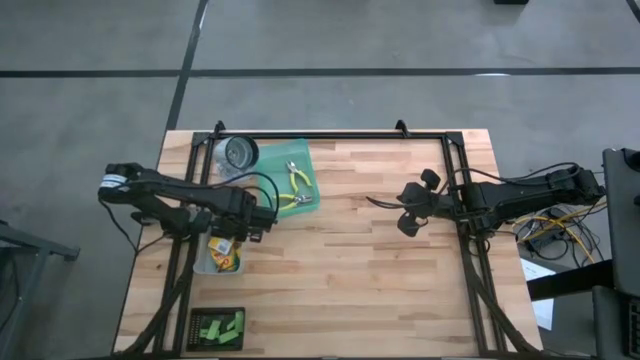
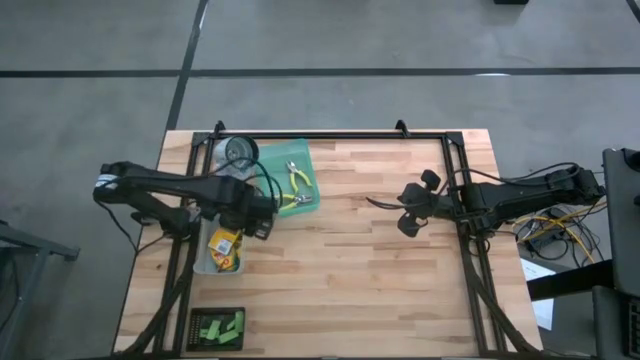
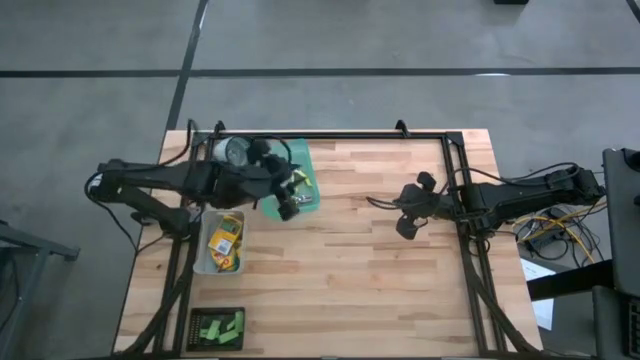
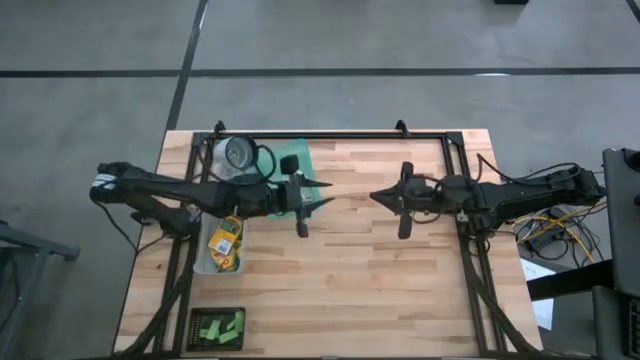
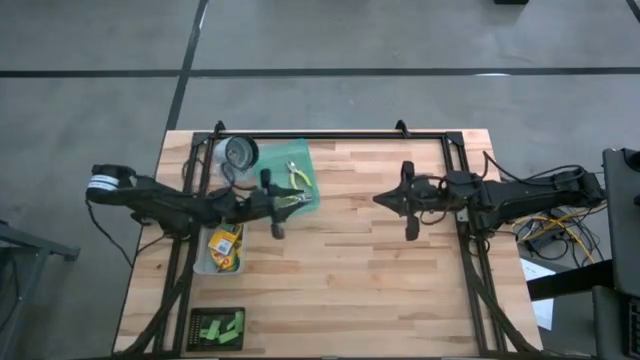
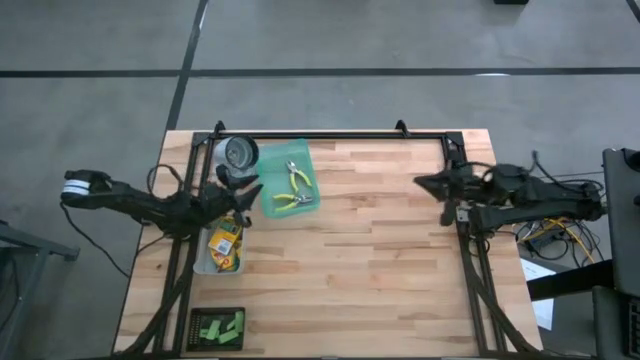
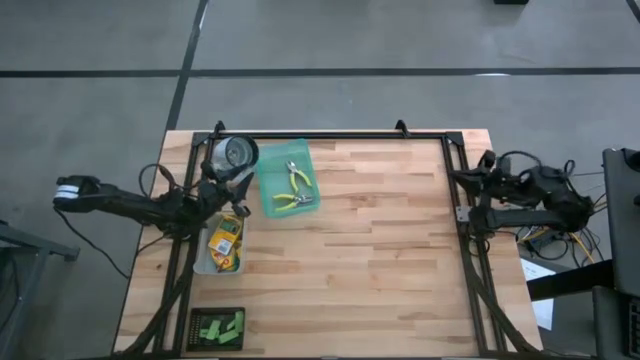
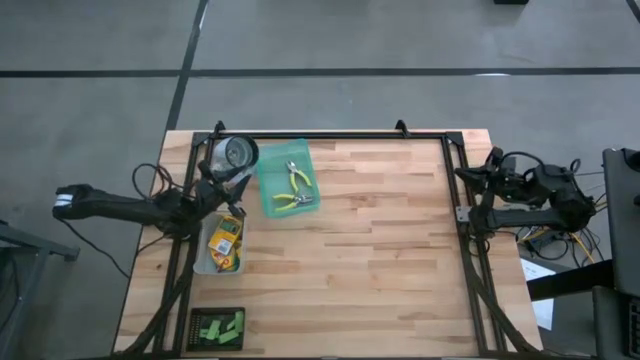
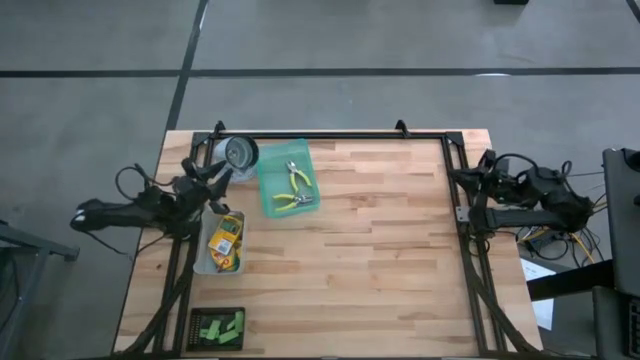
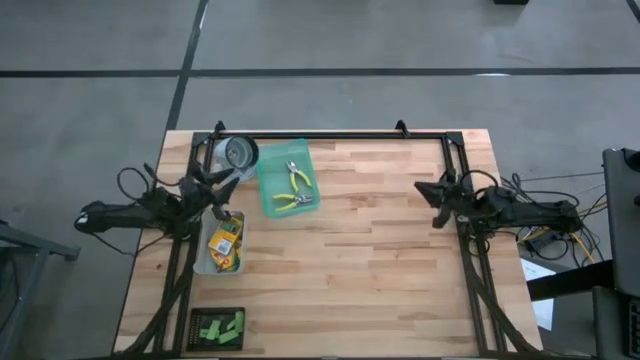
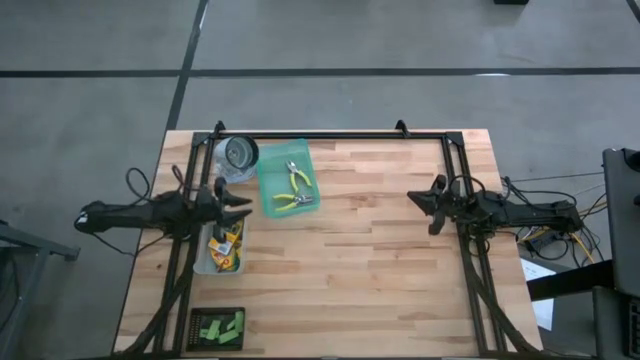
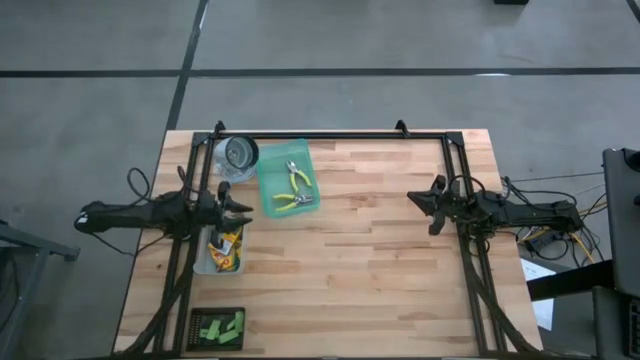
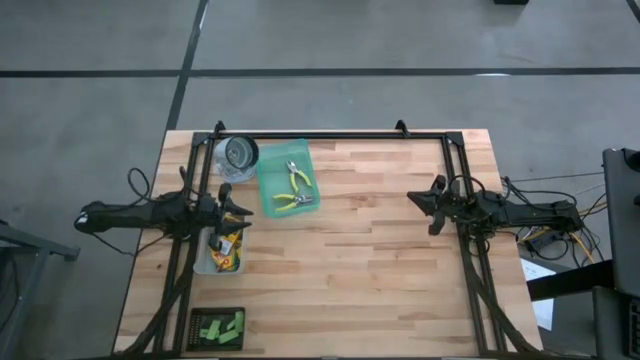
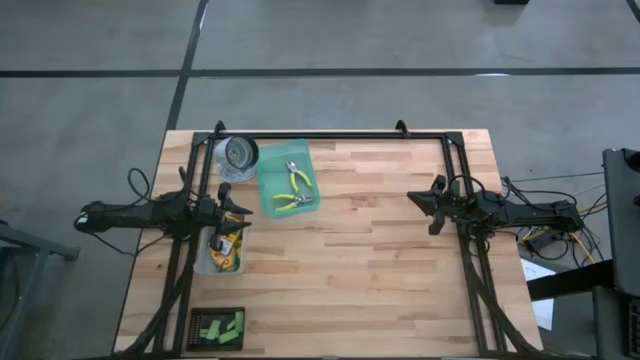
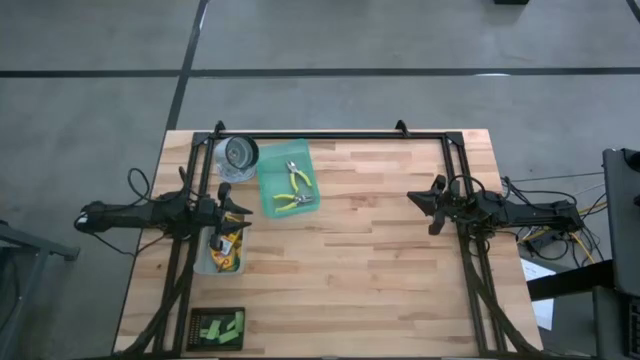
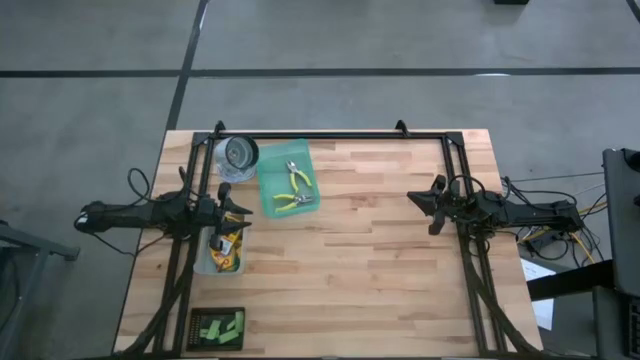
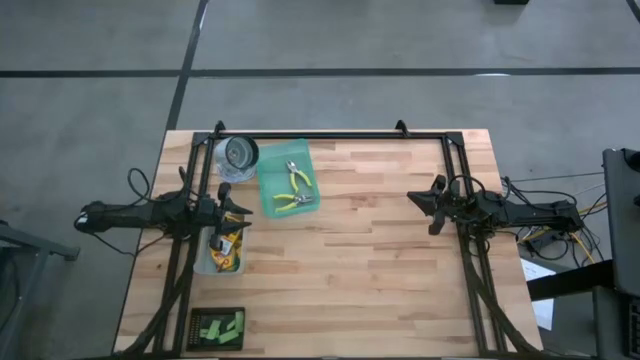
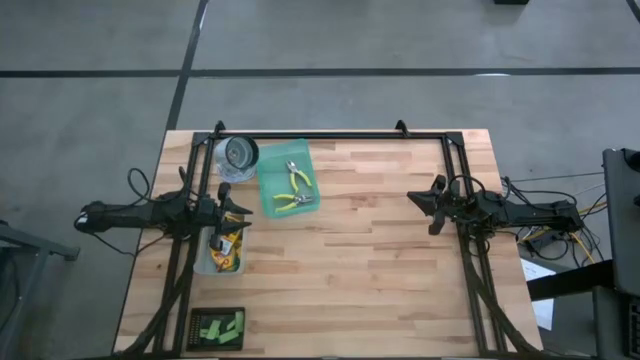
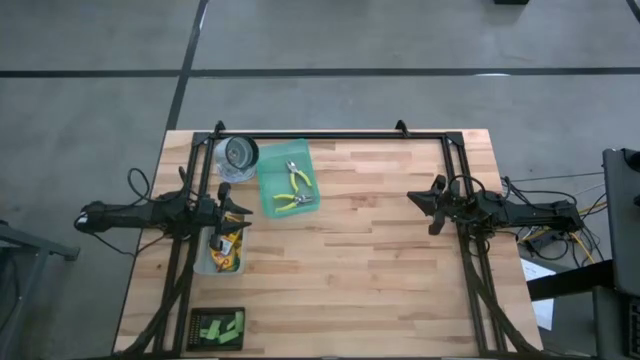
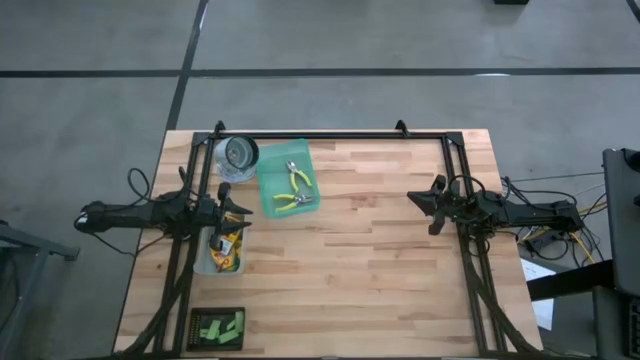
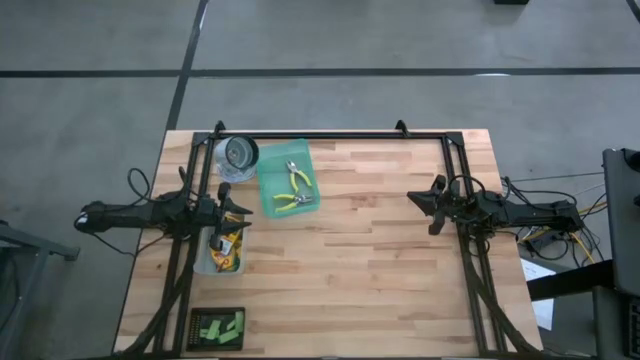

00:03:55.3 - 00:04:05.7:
Task: Pick & Place School Supplies
Return to Home Position

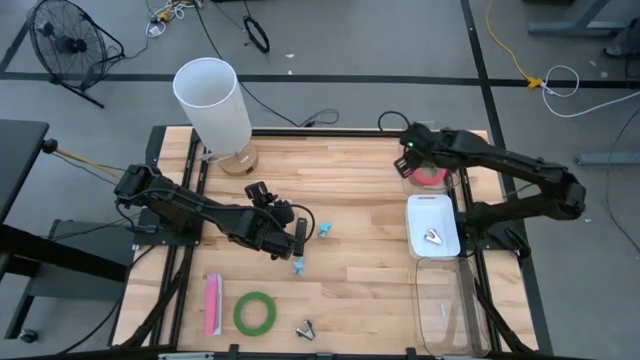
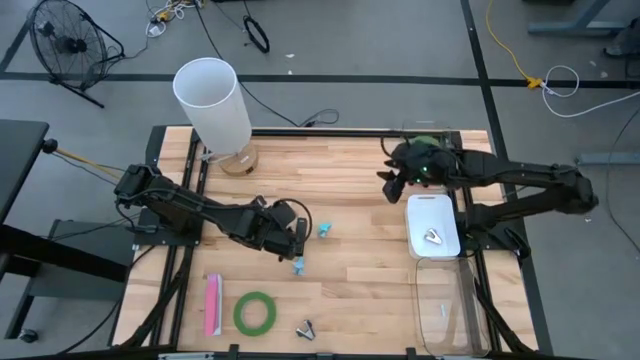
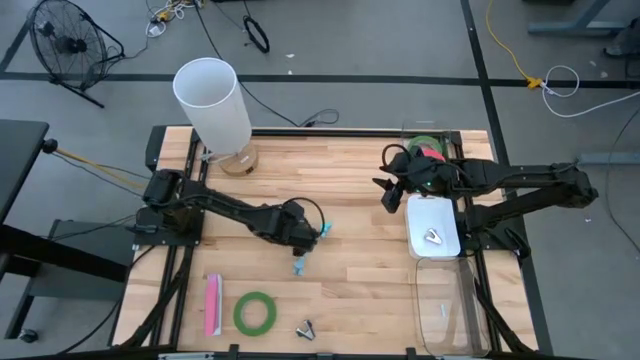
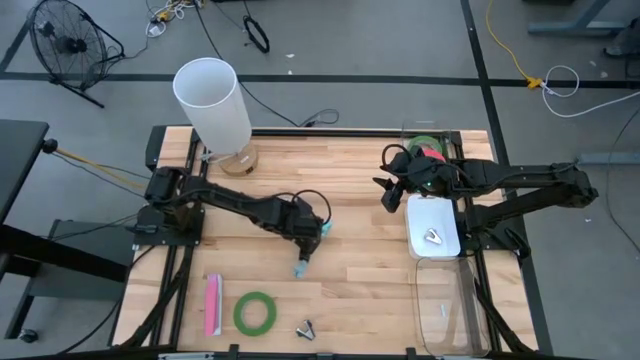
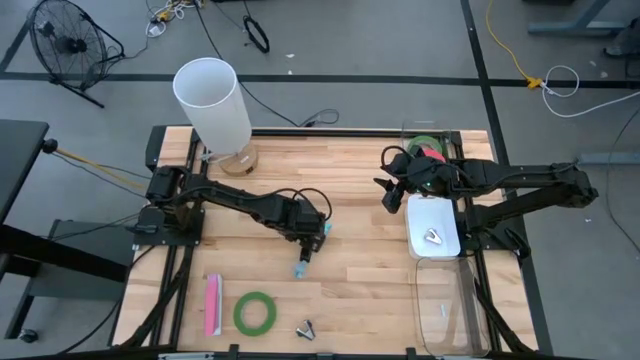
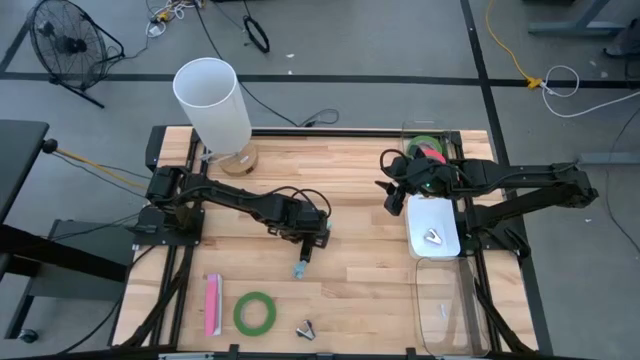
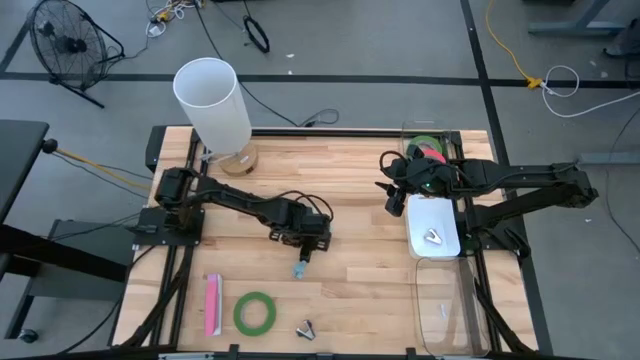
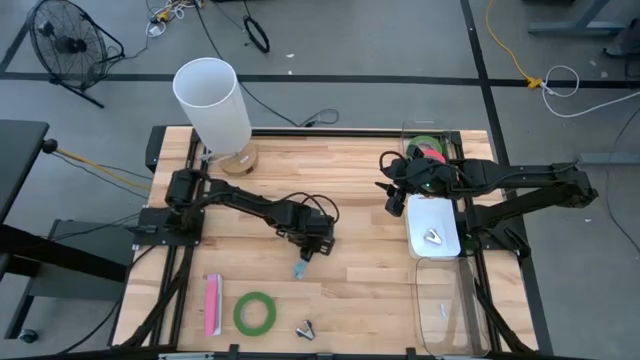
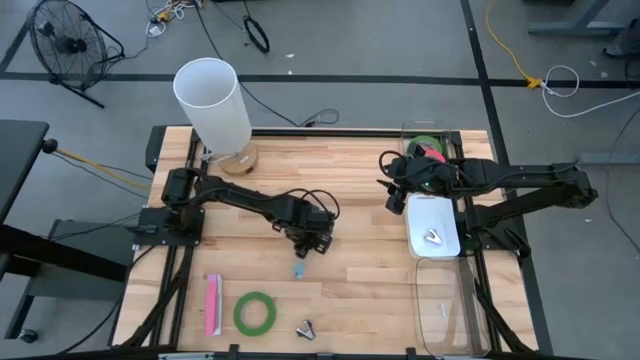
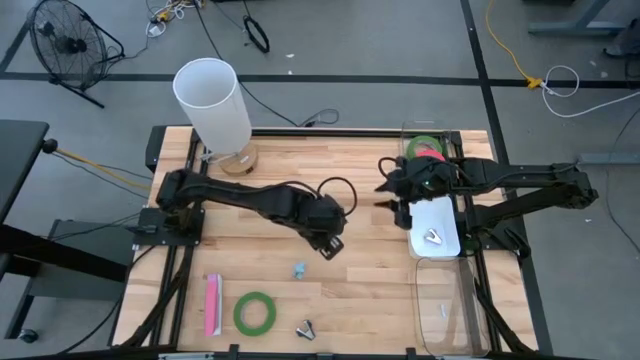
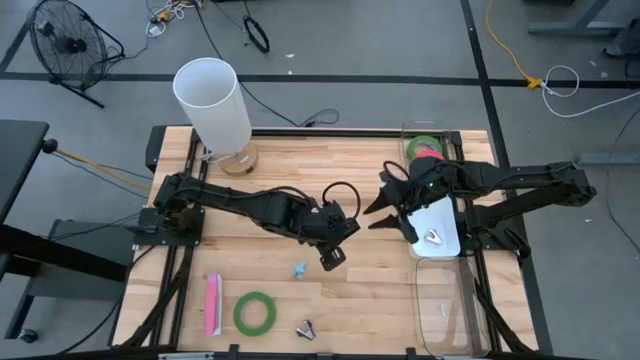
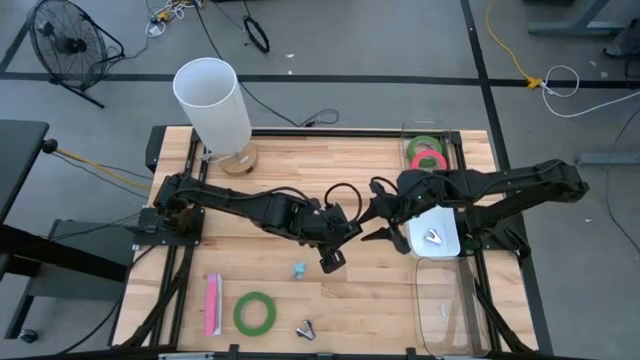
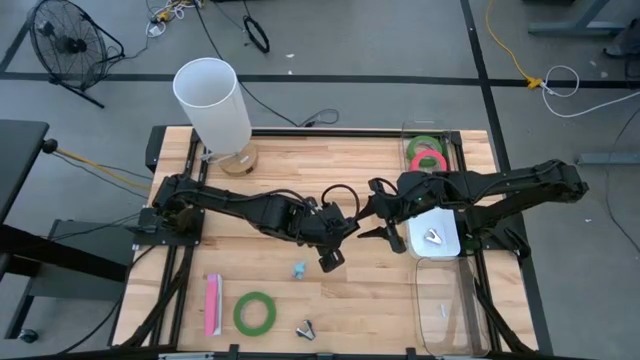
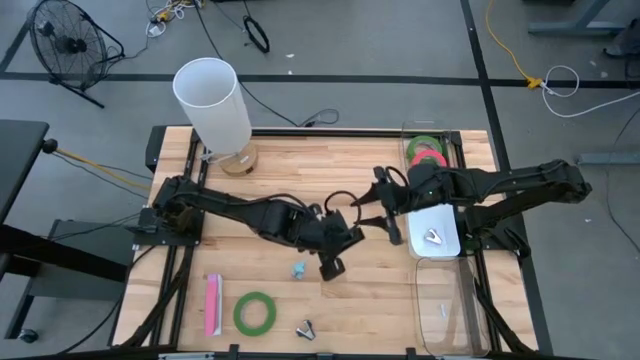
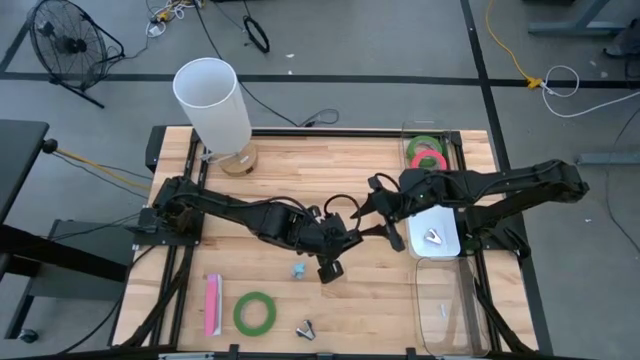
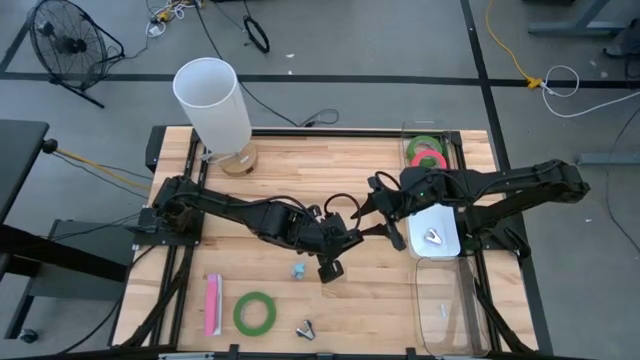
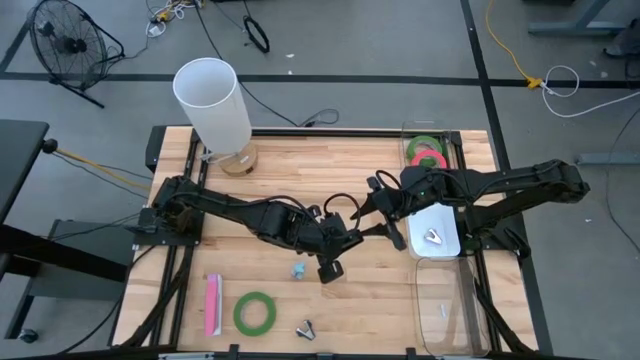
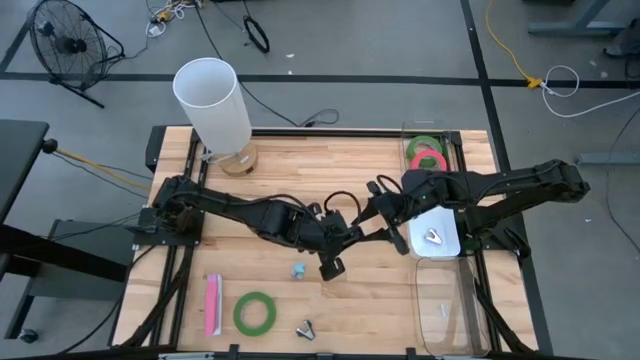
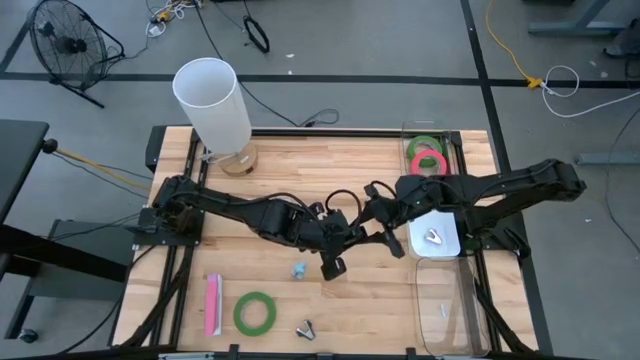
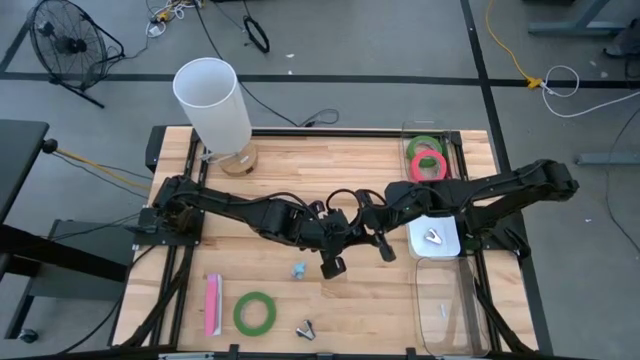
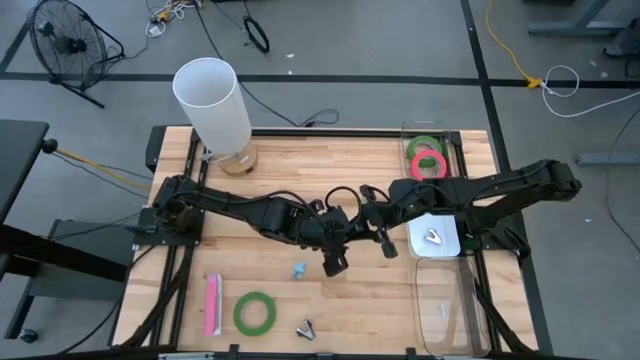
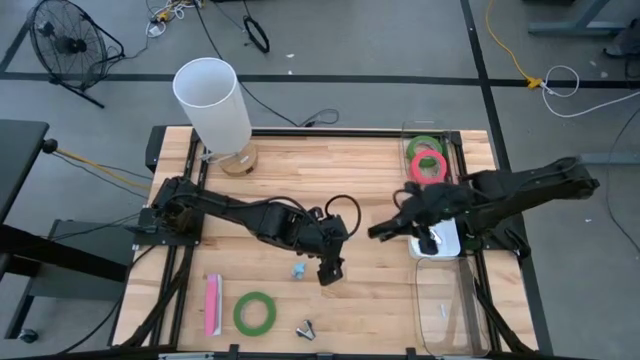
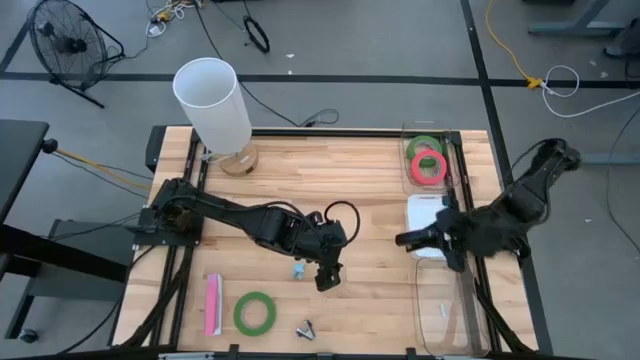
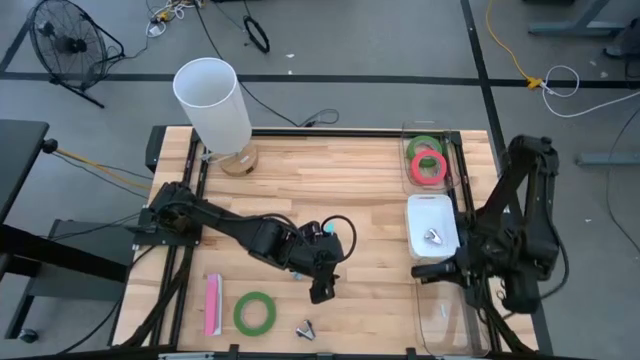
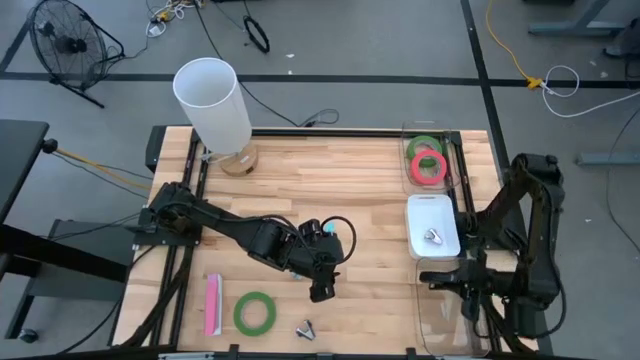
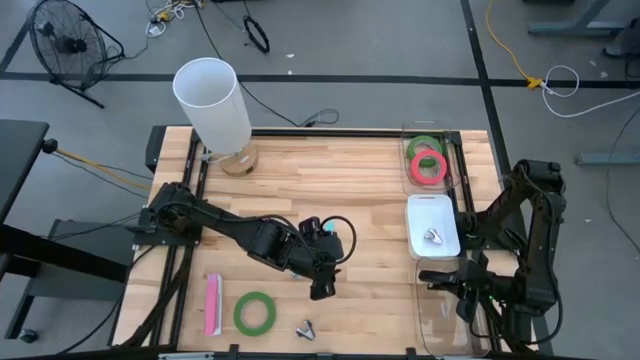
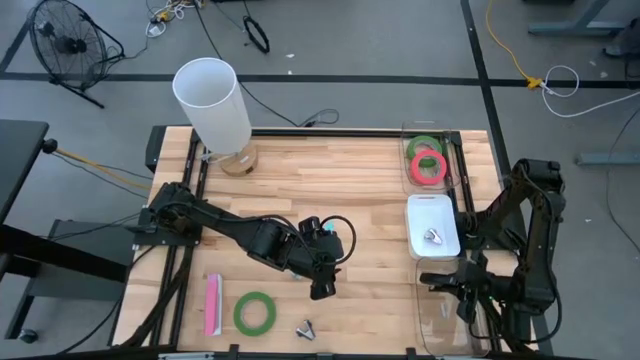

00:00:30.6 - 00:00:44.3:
Task: Pick and place Stapler, Stapler remover, tape
Put the black stapler into the bottom transparent bin
